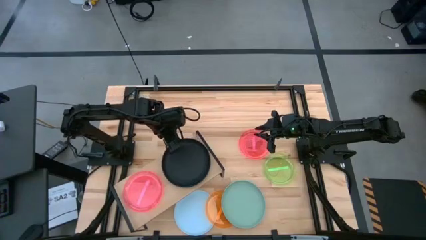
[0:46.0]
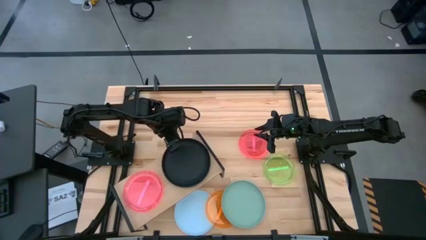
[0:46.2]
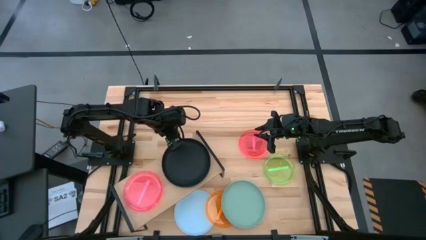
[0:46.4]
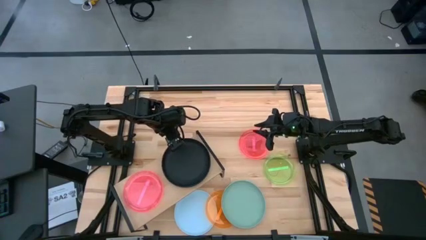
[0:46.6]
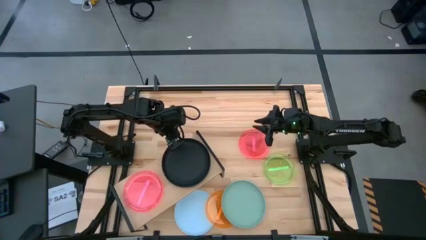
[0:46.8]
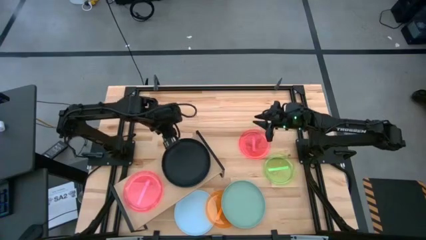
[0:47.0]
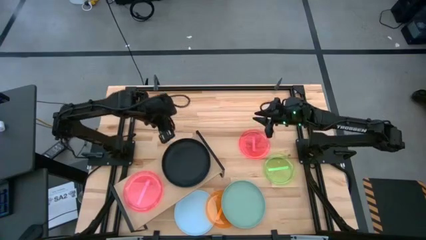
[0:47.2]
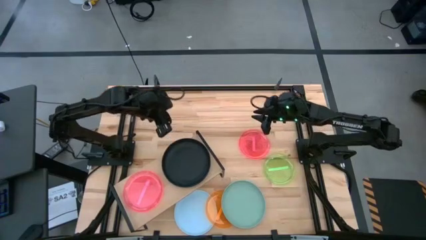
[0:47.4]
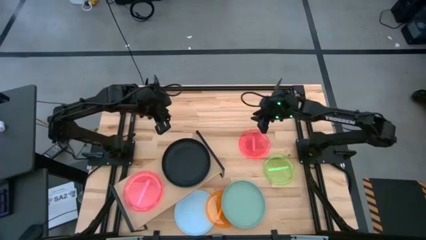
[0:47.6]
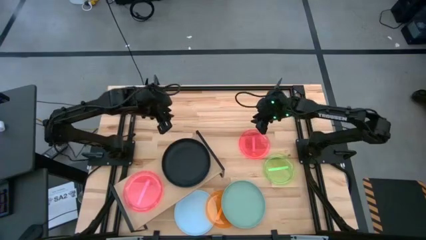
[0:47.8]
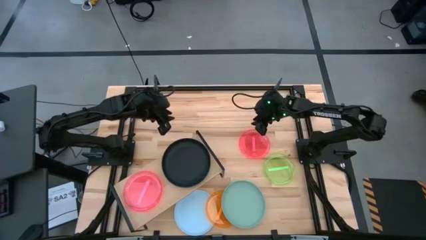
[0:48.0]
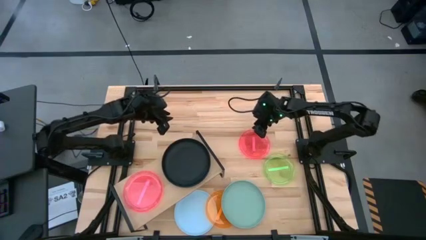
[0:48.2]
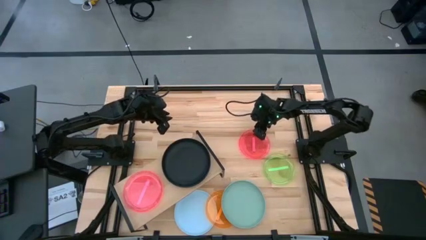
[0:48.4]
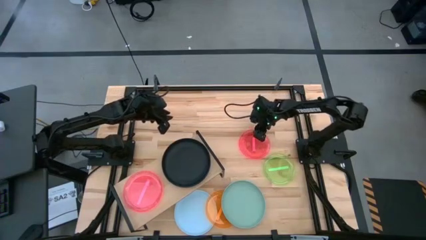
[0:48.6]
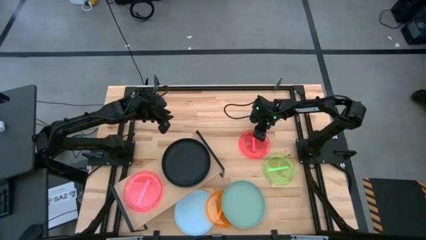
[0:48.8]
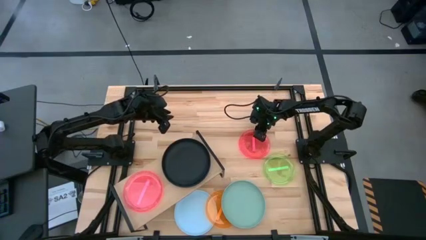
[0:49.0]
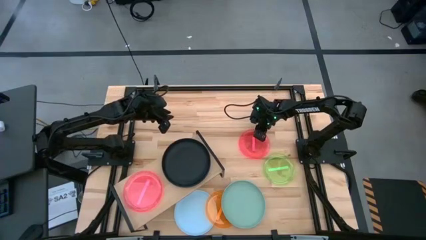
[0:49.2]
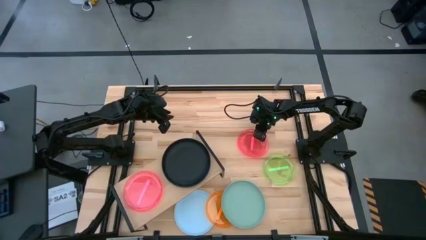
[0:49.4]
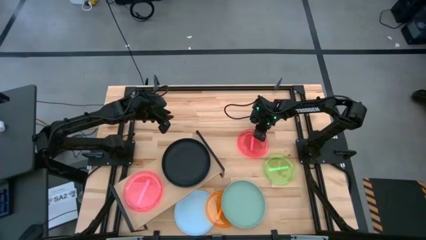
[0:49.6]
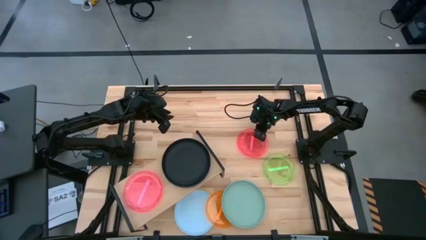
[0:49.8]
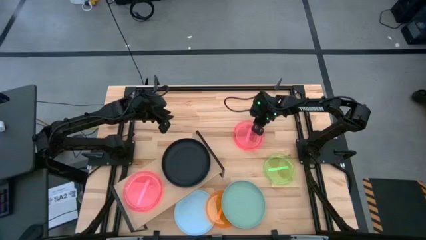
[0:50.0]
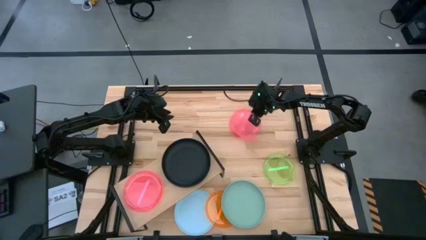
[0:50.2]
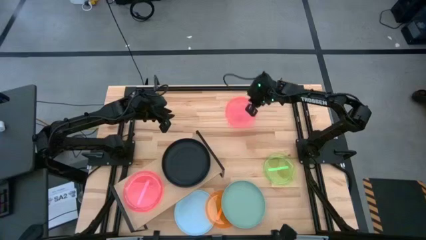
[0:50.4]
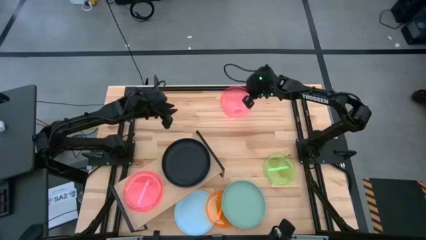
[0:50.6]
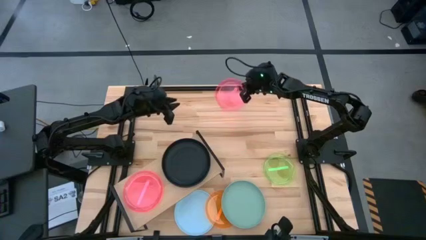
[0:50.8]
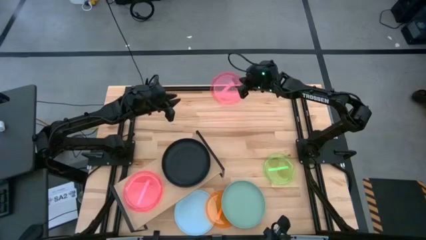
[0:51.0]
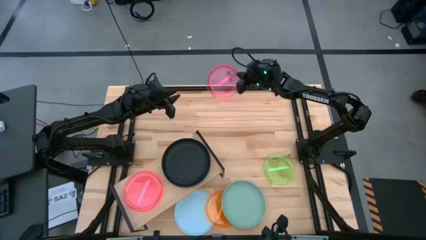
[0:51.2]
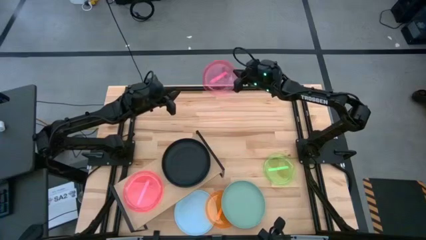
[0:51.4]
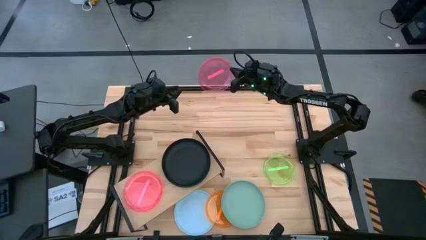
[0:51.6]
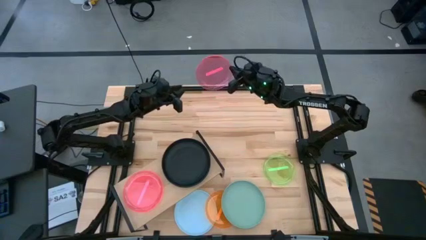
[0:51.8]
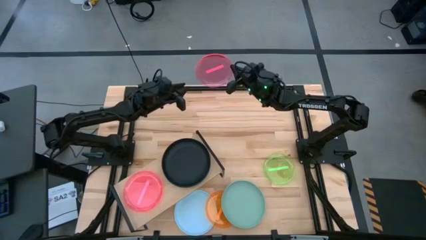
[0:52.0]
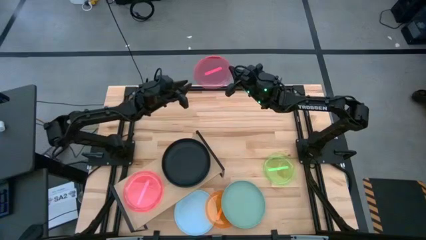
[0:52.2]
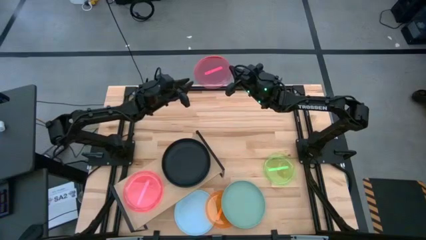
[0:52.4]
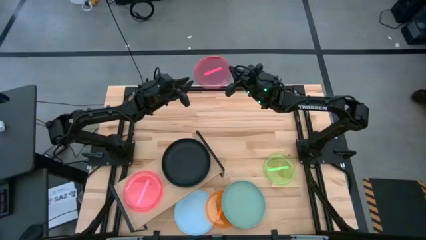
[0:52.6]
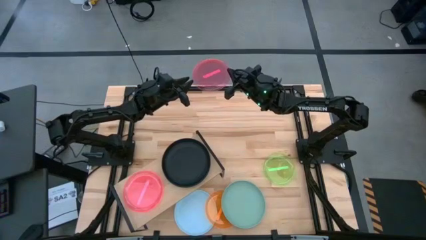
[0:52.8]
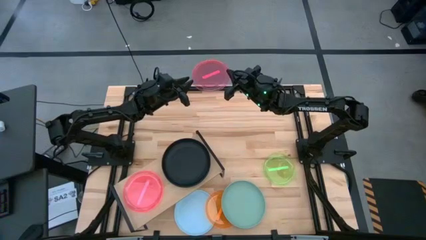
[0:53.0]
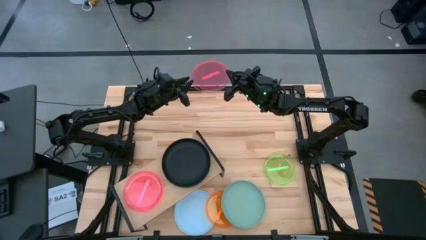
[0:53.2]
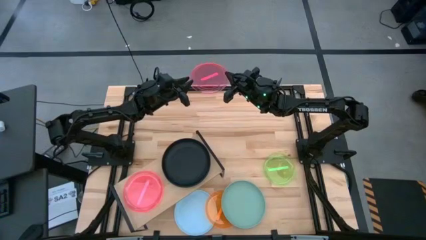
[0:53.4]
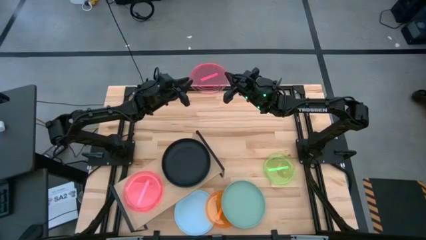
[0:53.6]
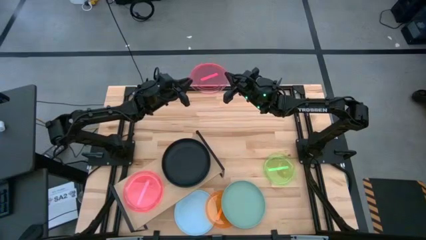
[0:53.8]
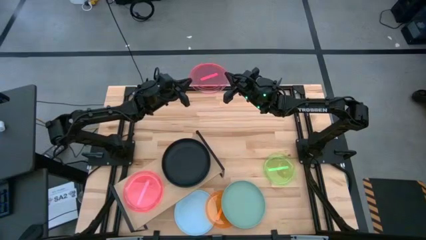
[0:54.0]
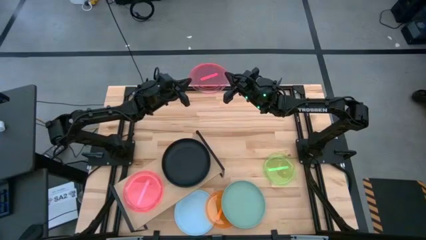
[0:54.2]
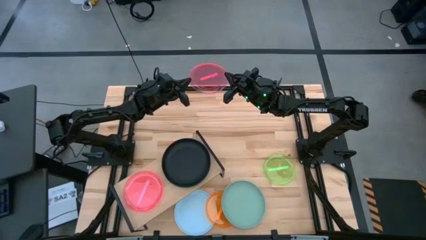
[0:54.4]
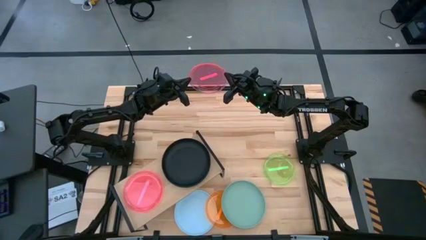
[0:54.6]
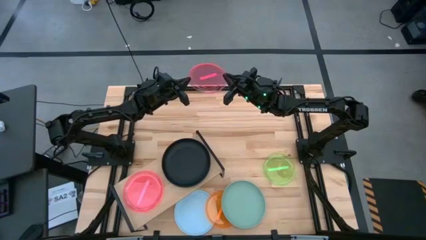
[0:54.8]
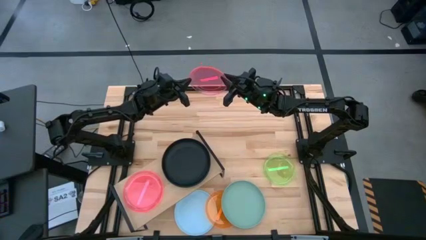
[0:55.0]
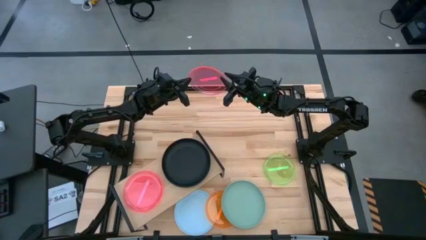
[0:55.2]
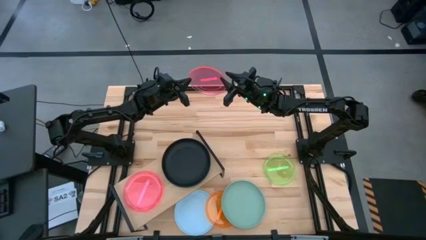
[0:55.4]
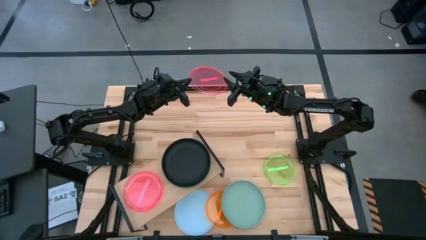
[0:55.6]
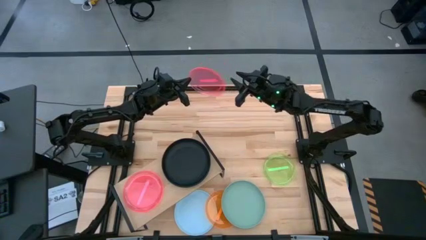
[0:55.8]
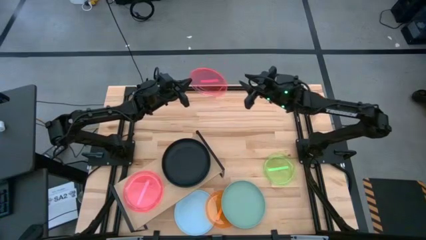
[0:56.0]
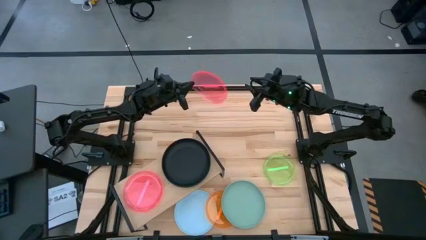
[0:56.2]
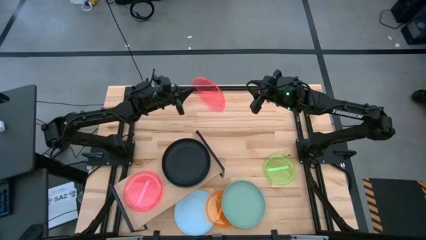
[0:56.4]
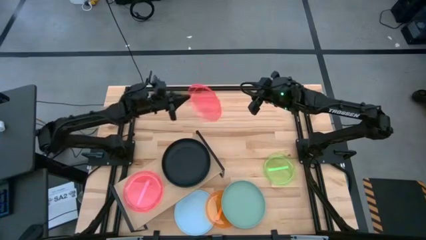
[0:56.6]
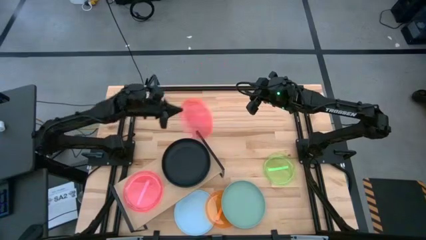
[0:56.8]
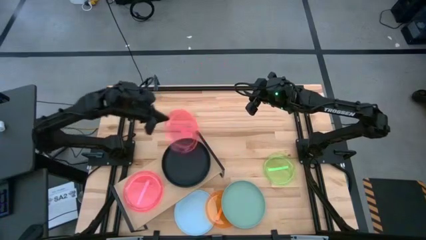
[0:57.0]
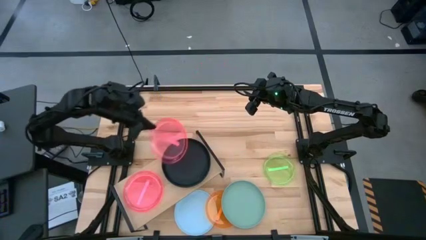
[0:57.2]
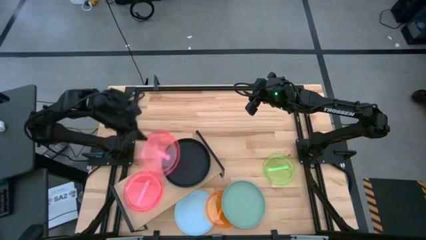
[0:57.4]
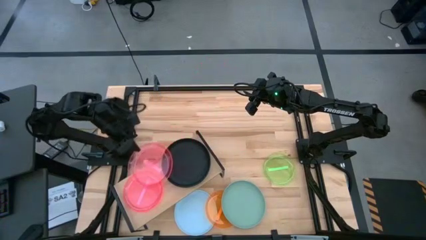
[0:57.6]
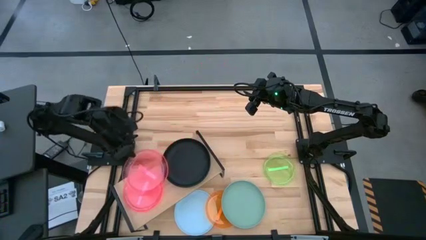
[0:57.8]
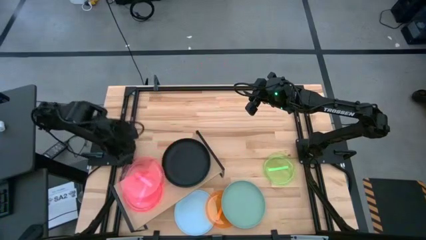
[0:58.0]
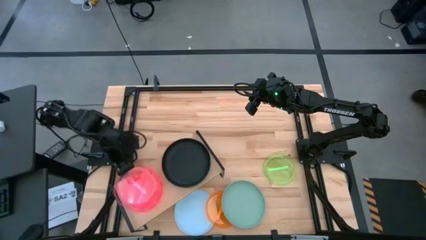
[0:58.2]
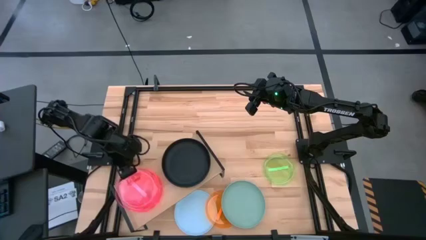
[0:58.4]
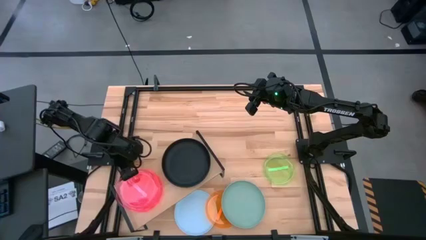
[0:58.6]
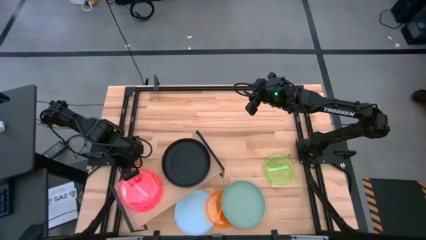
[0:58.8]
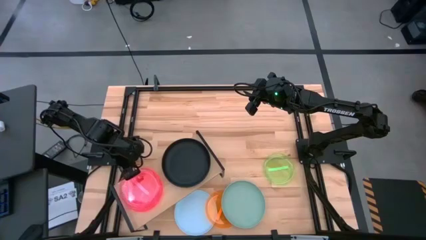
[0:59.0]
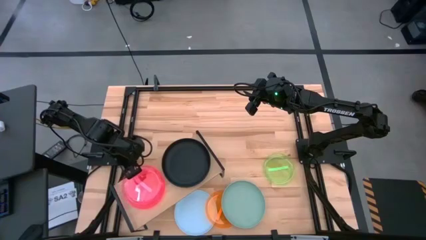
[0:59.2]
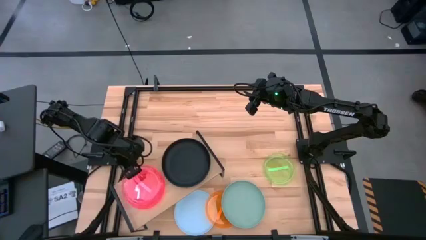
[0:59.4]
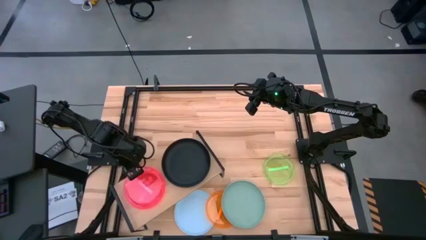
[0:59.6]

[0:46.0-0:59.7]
Task: Place and stack plates onto a shelf
Stack the pink plate on top of the pink plate on the shelf
